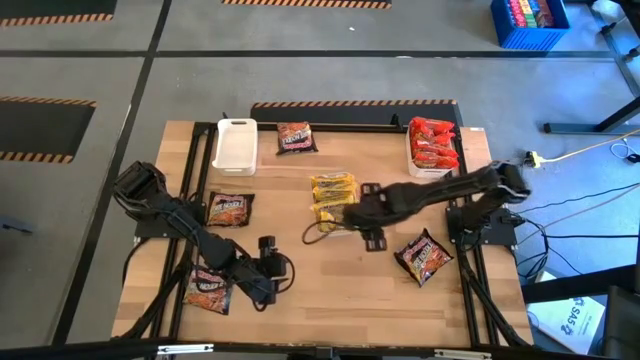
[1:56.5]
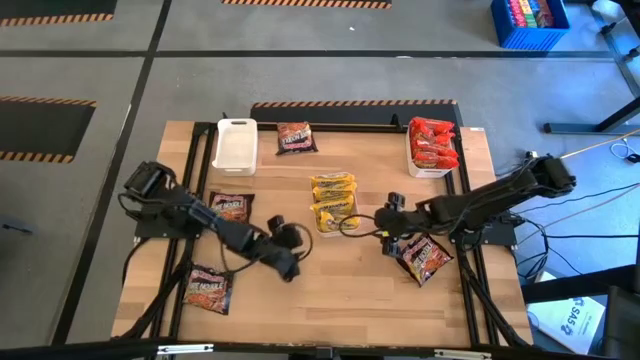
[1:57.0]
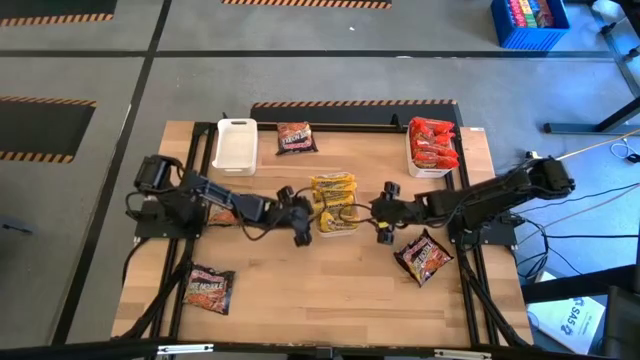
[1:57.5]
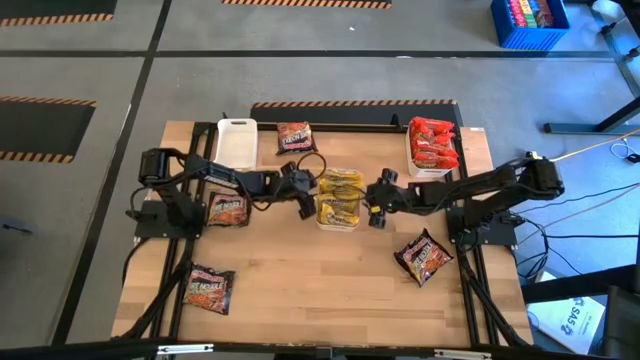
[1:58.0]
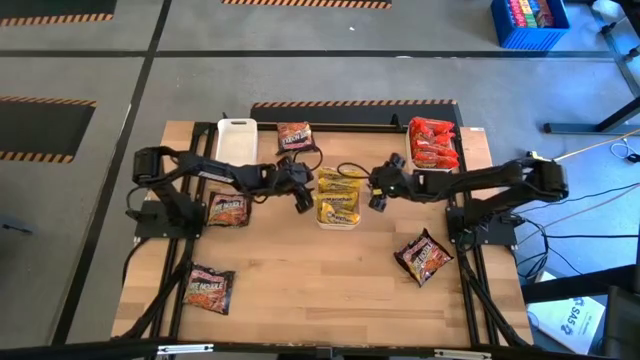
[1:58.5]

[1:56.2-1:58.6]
Task: Sort Maruchan noodles
Adjust the white middle bin

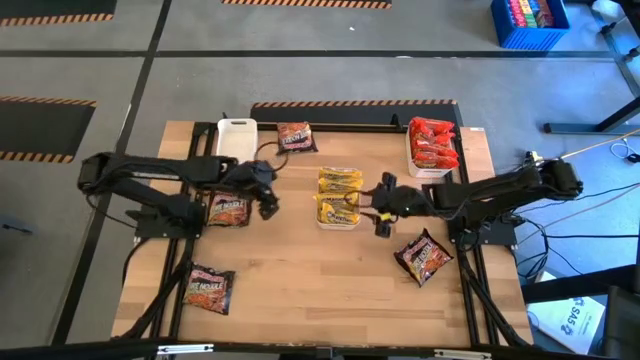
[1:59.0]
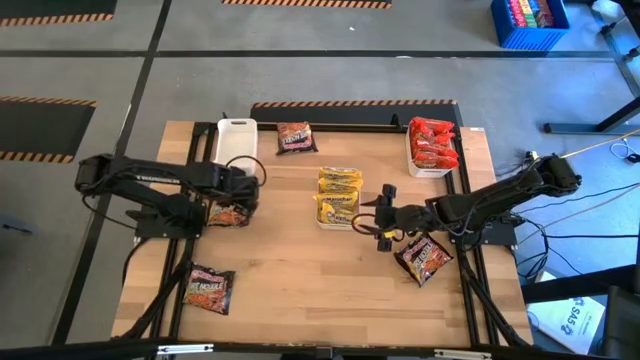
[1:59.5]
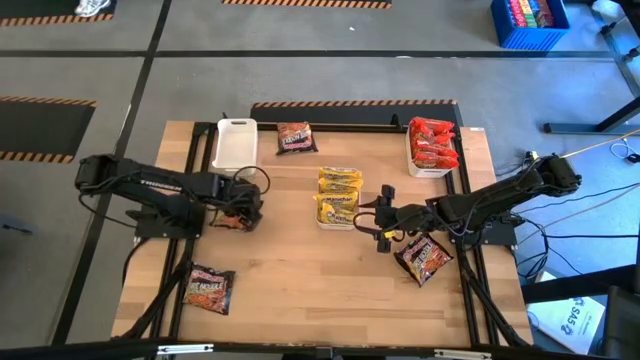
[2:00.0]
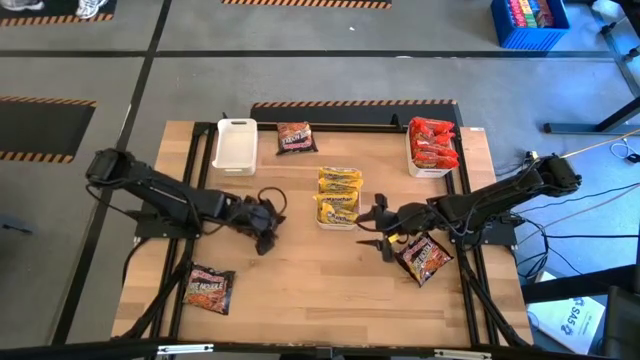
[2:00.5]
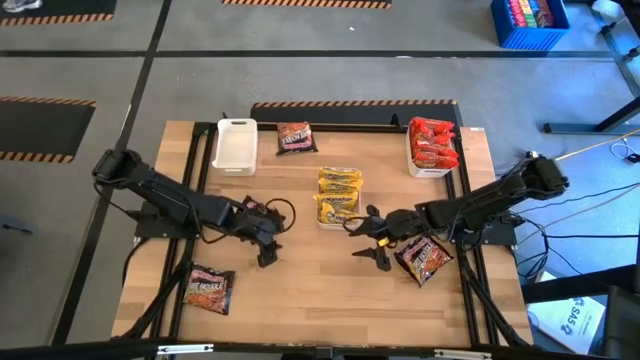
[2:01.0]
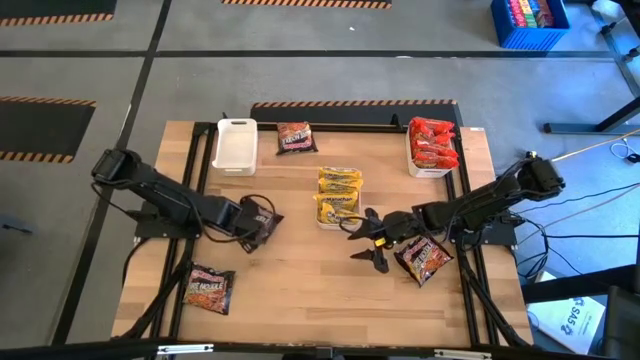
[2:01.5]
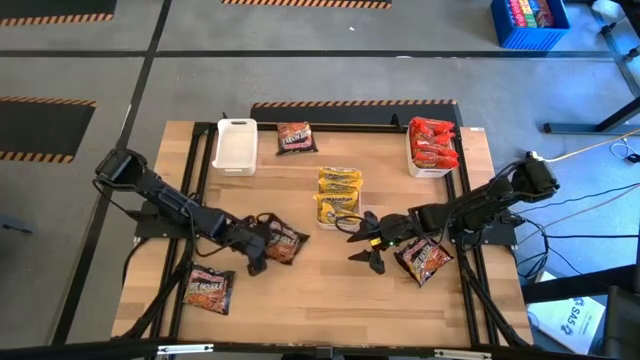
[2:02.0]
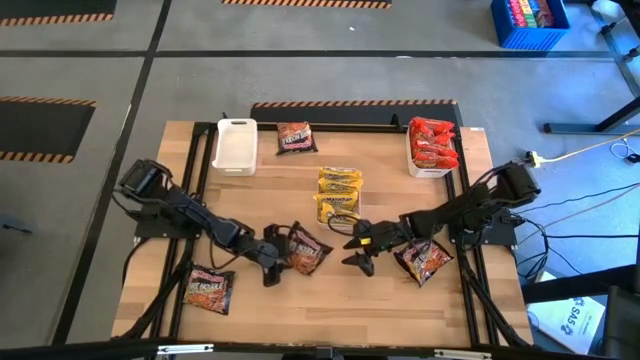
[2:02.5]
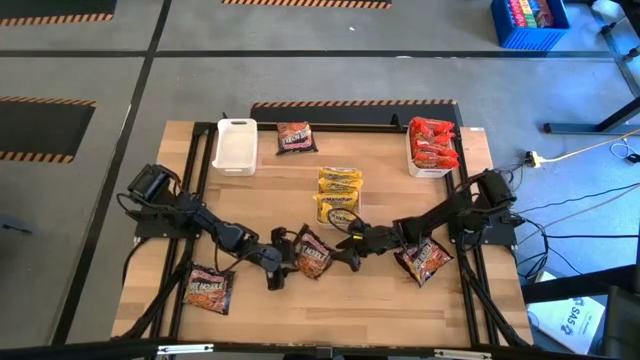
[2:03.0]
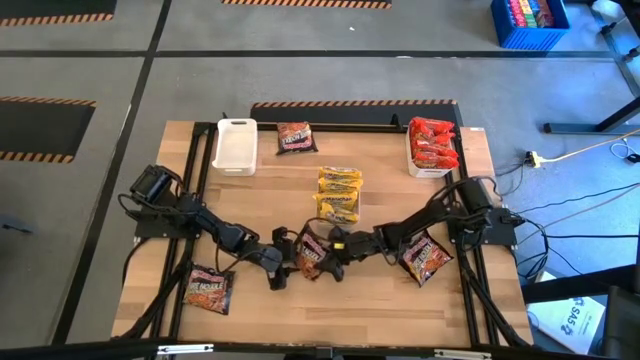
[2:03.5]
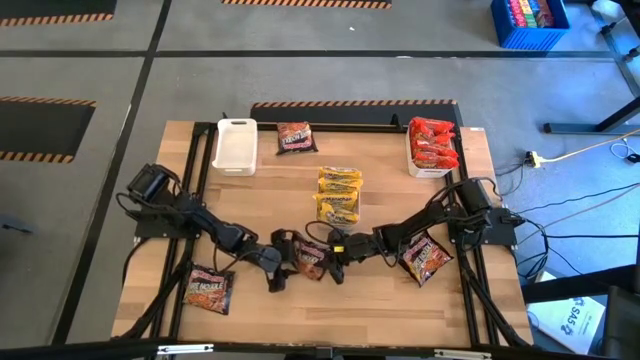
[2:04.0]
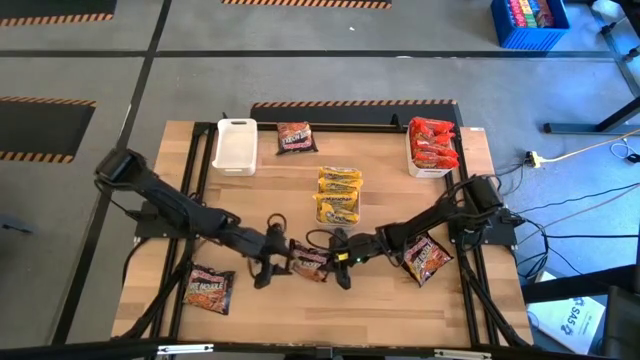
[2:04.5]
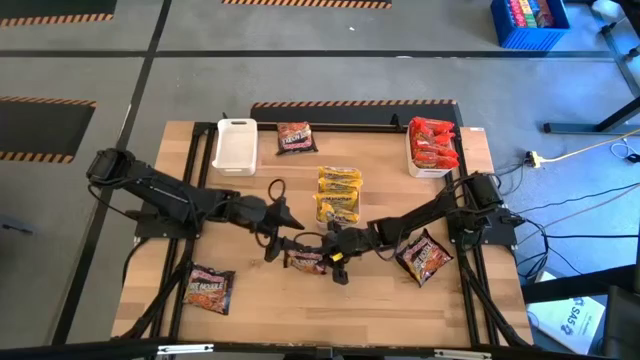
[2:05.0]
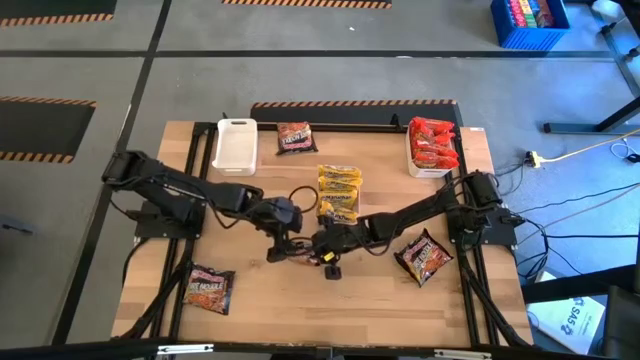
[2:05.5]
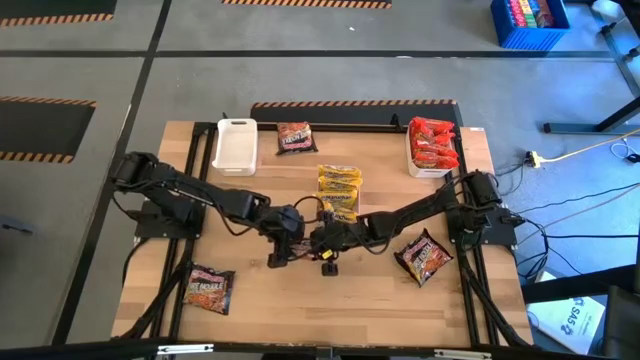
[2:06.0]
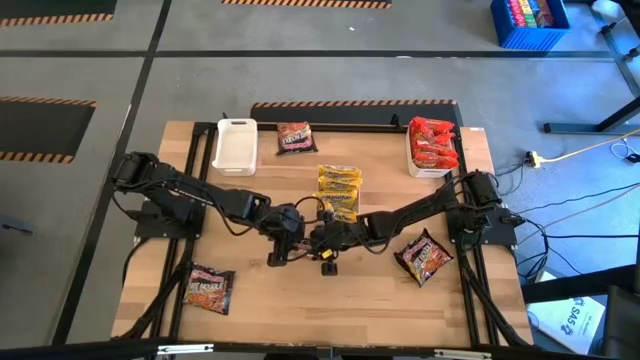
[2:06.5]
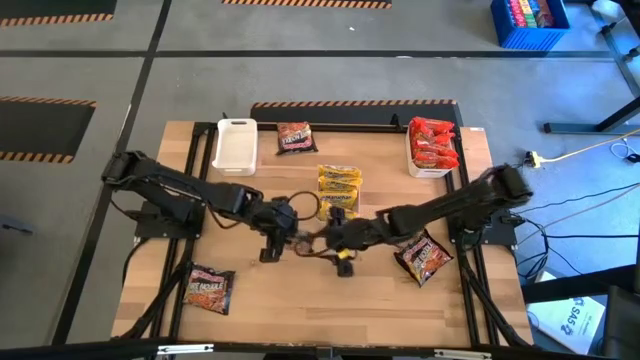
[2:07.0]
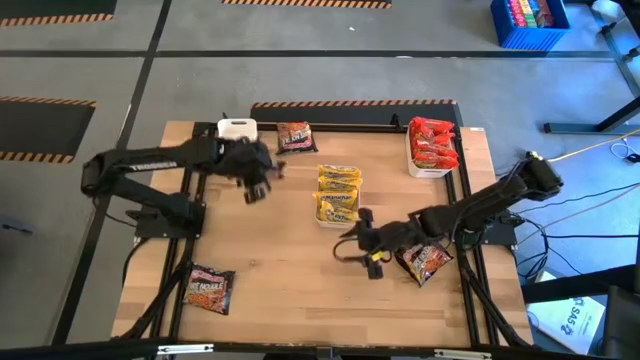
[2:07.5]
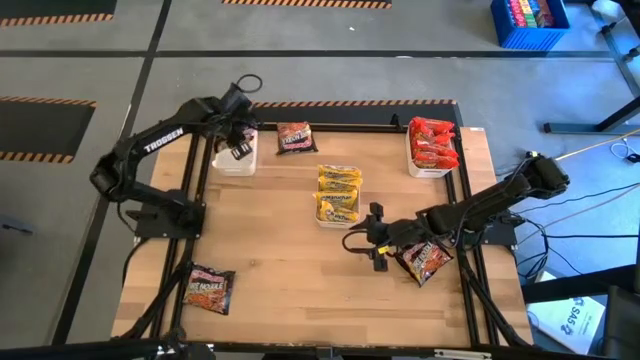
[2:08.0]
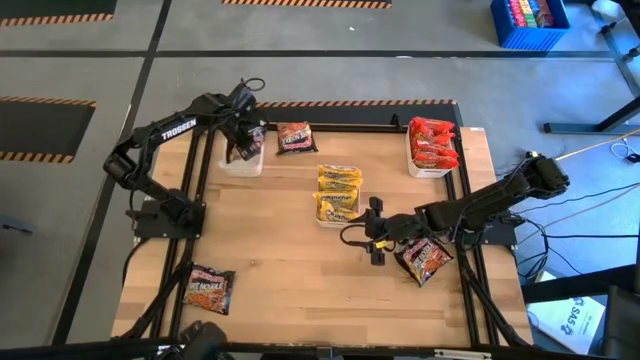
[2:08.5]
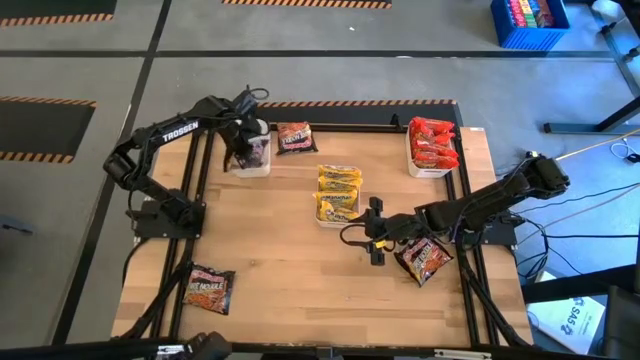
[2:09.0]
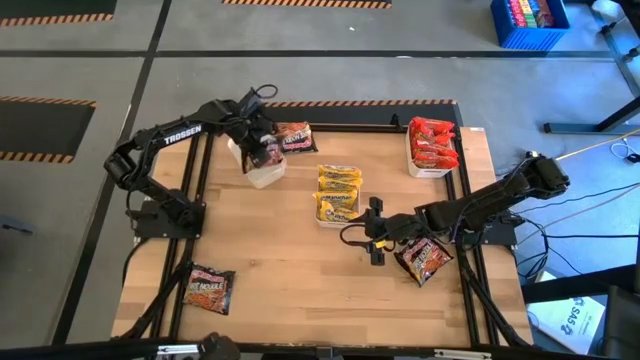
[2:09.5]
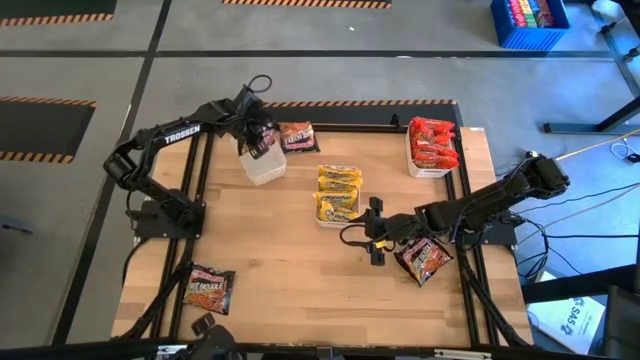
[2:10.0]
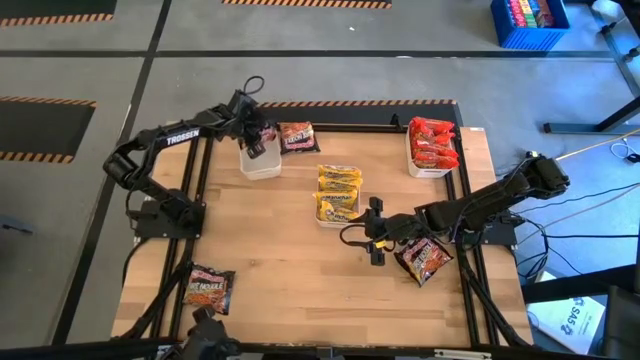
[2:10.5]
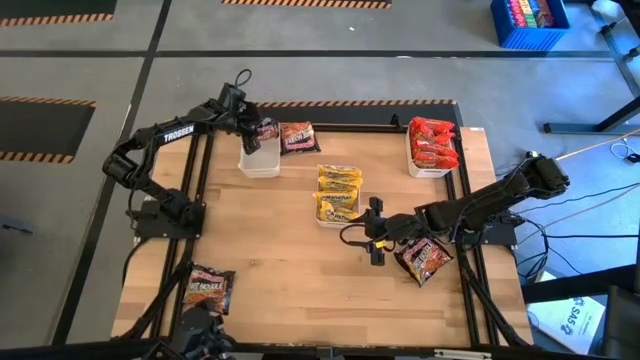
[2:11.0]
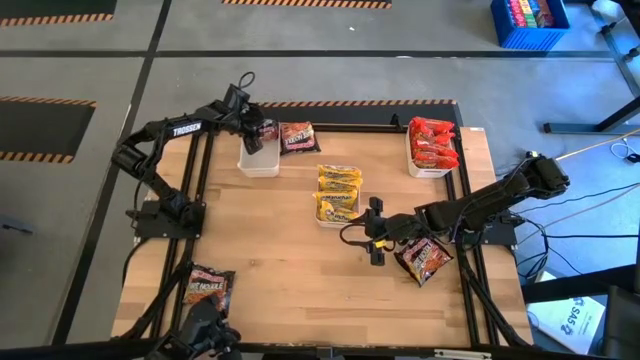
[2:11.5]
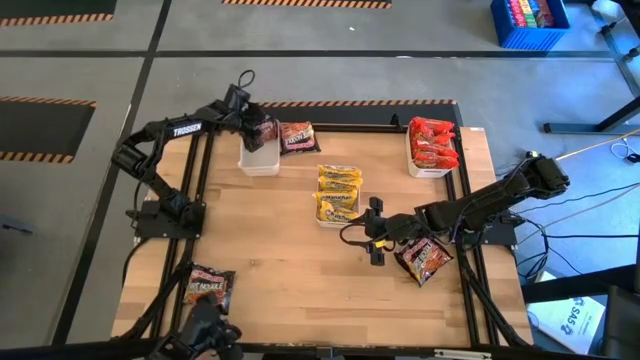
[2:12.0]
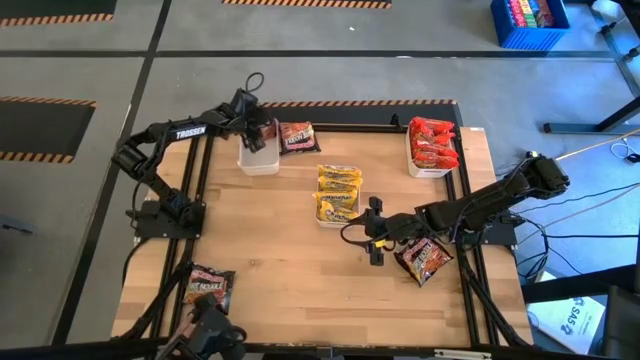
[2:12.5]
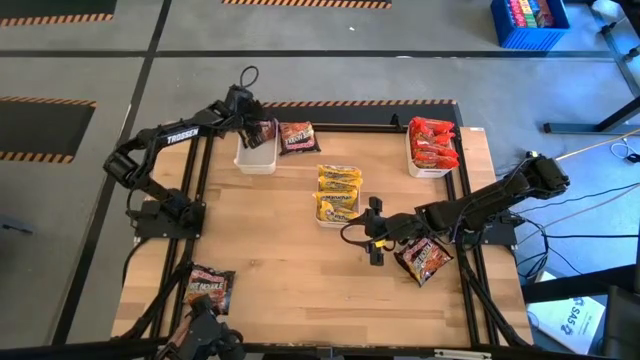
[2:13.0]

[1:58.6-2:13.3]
Put the black noodle pack into the white left bin

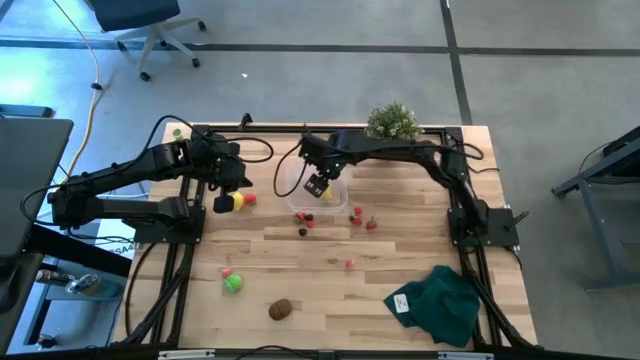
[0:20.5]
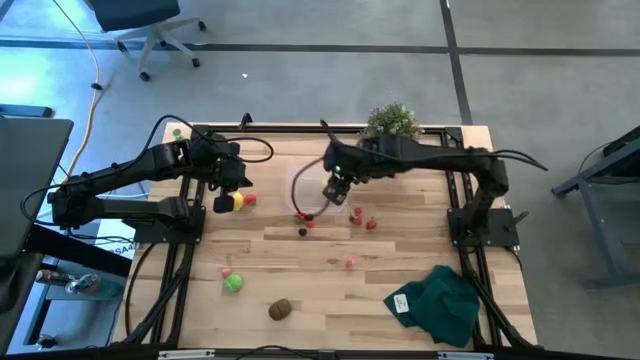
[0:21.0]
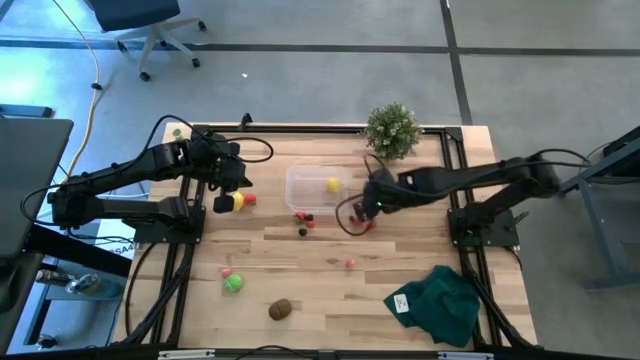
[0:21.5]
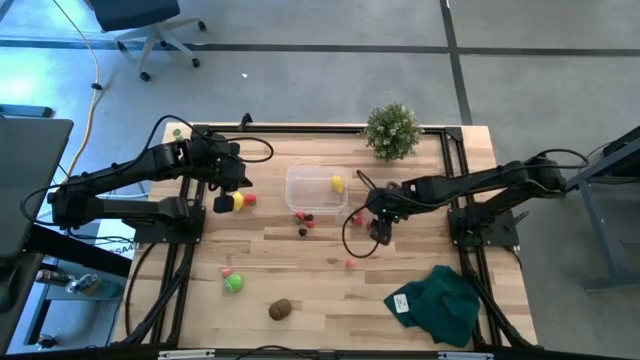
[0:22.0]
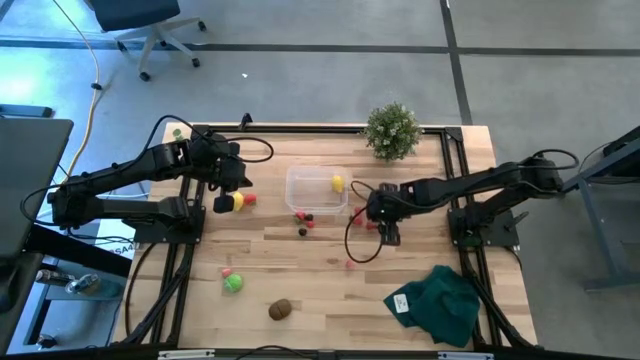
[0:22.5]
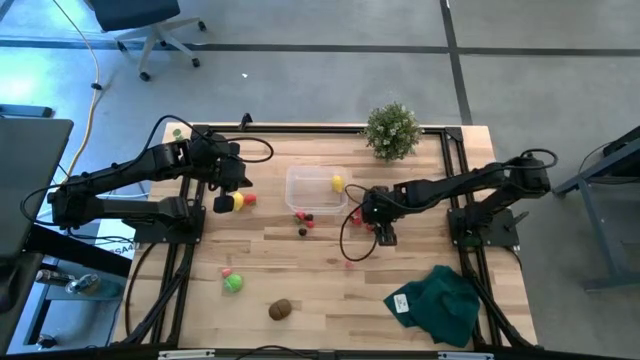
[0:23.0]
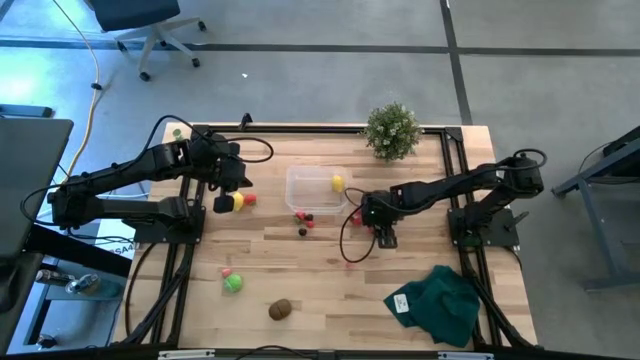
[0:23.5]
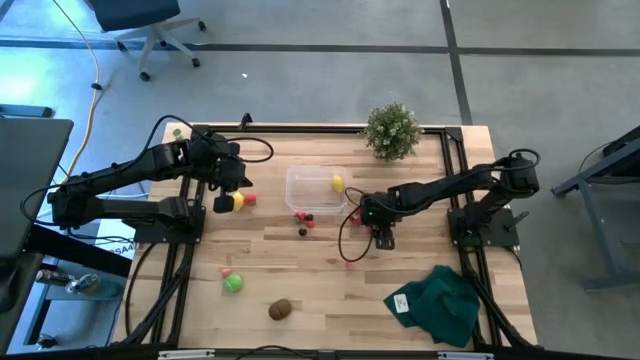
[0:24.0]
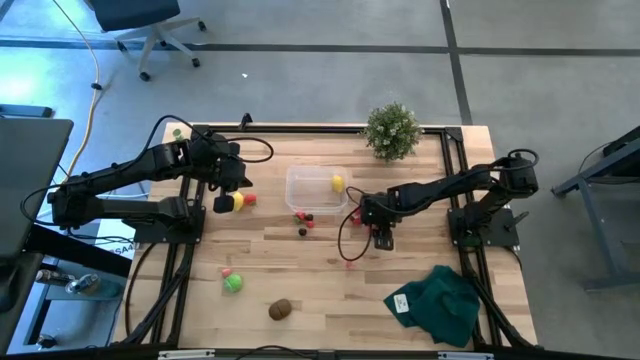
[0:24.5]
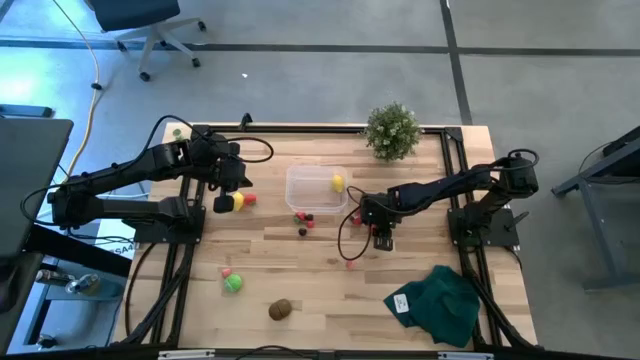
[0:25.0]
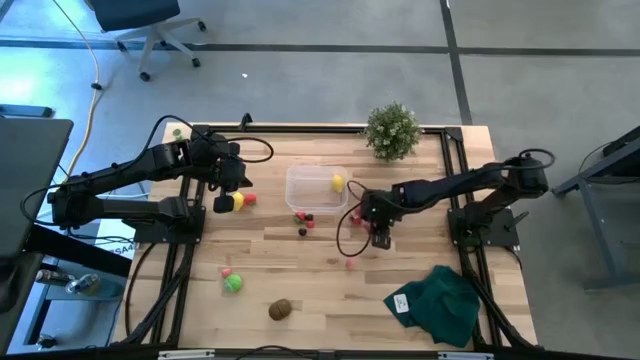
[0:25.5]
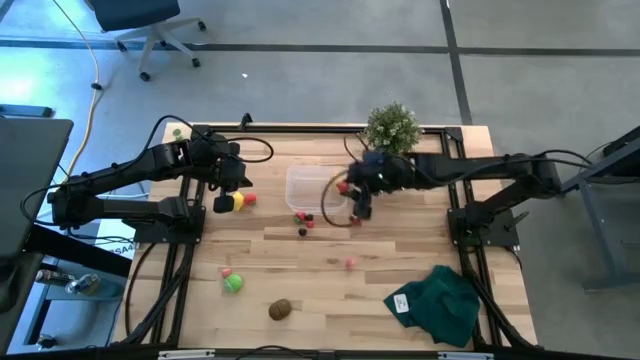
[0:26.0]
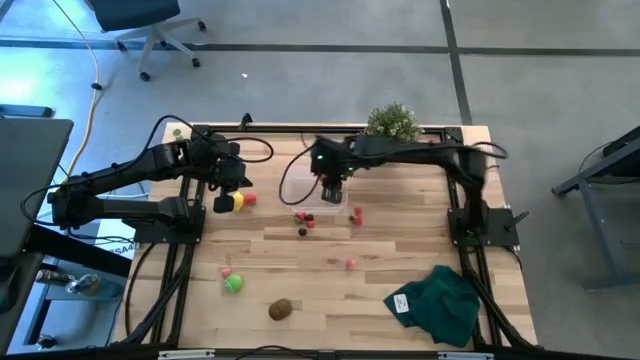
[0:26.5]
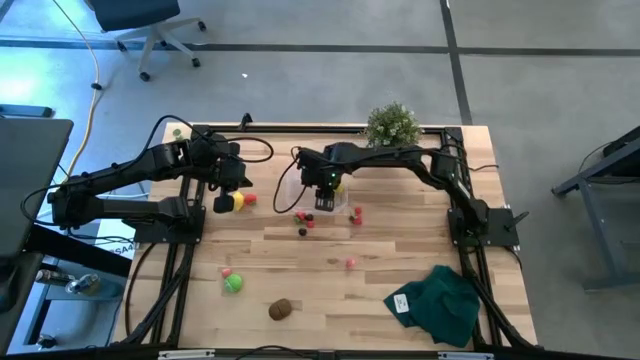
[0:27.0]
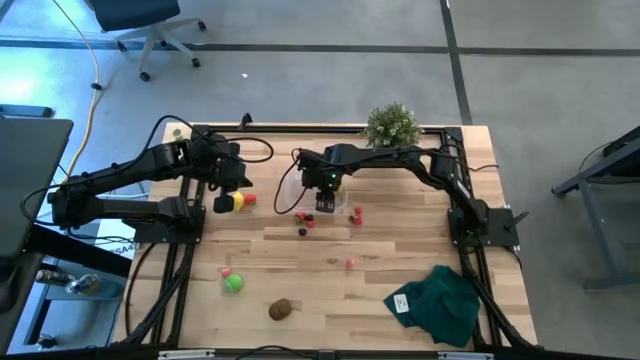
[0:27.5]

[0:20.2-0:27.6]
Task: Pick and placing Produce into tupperware
Put the red strawberry into the transparent bin
